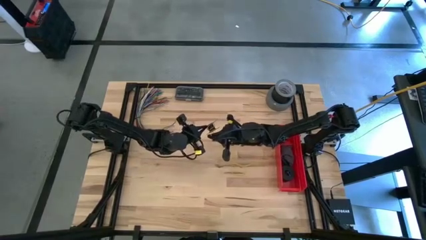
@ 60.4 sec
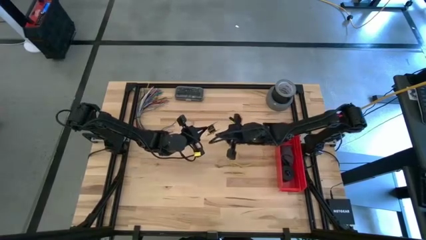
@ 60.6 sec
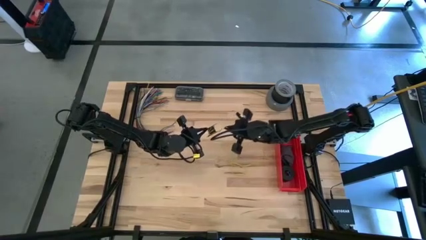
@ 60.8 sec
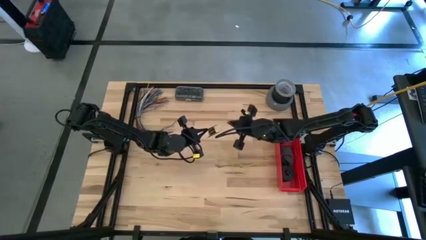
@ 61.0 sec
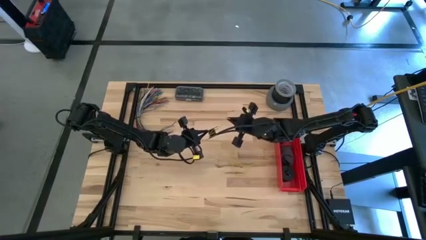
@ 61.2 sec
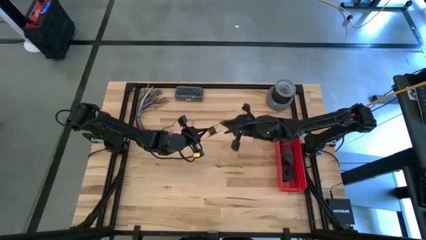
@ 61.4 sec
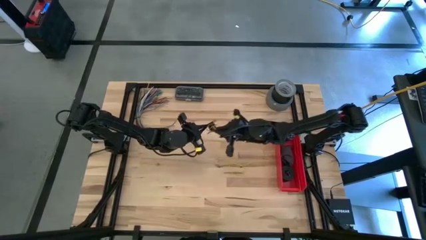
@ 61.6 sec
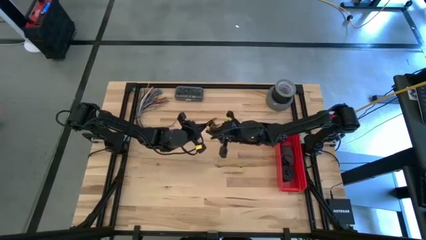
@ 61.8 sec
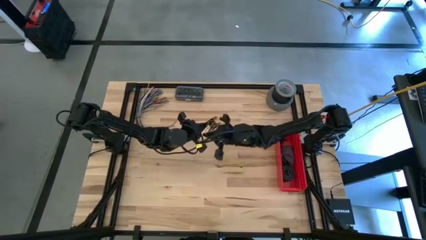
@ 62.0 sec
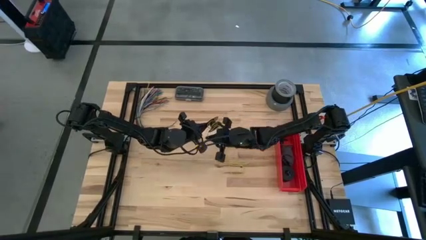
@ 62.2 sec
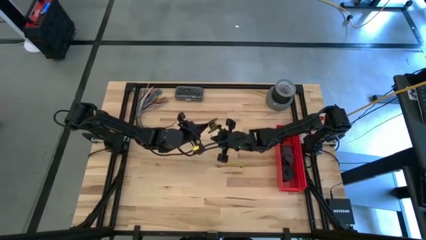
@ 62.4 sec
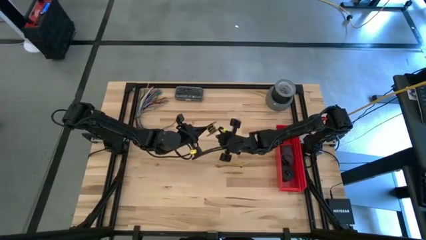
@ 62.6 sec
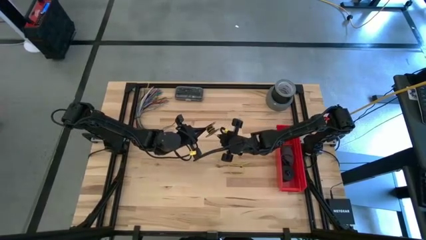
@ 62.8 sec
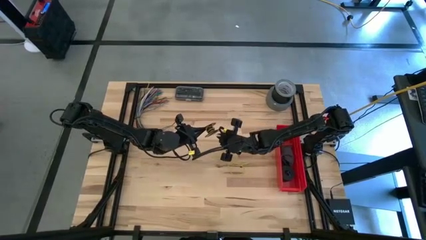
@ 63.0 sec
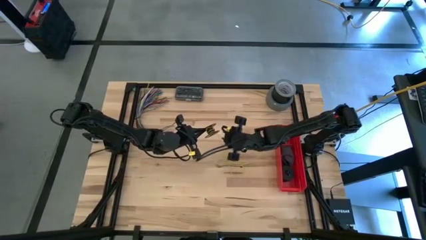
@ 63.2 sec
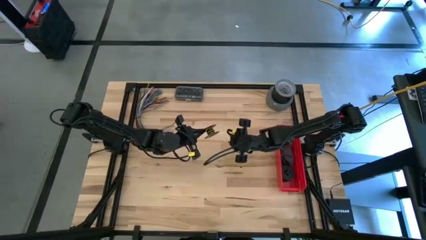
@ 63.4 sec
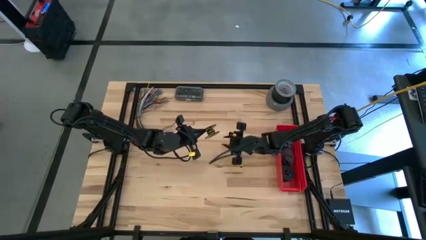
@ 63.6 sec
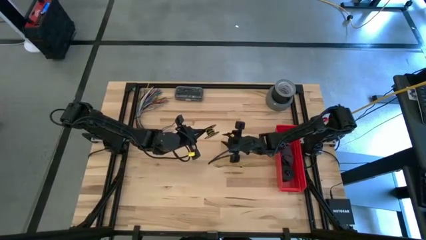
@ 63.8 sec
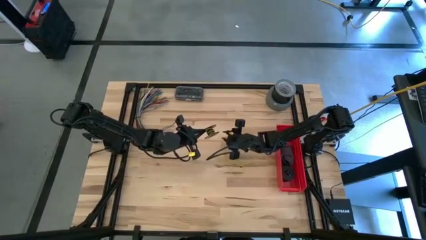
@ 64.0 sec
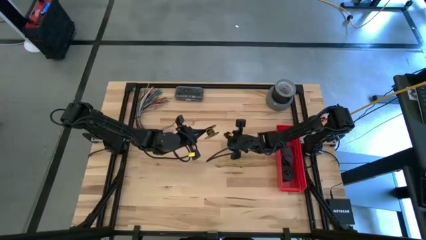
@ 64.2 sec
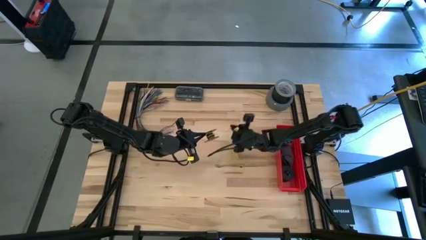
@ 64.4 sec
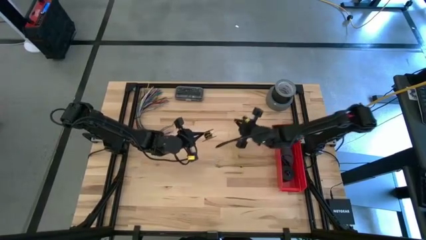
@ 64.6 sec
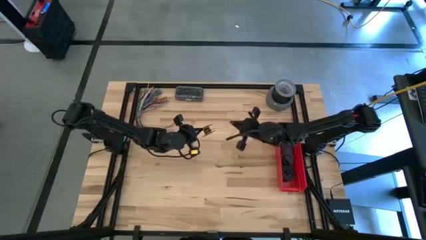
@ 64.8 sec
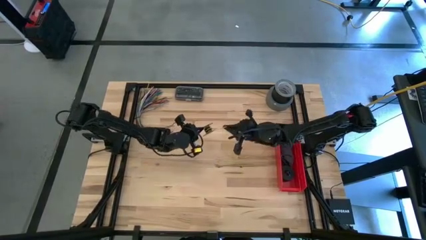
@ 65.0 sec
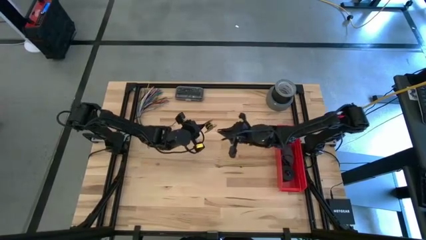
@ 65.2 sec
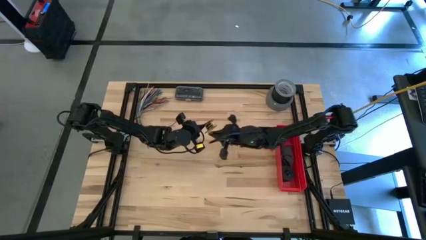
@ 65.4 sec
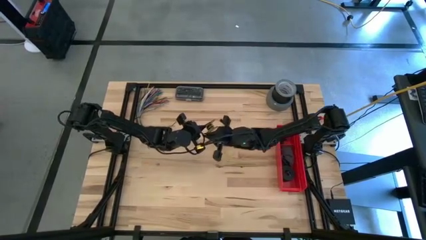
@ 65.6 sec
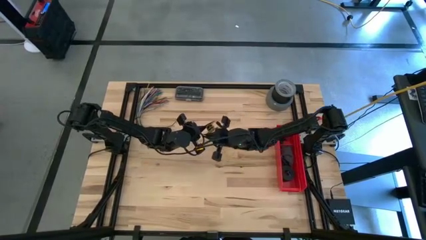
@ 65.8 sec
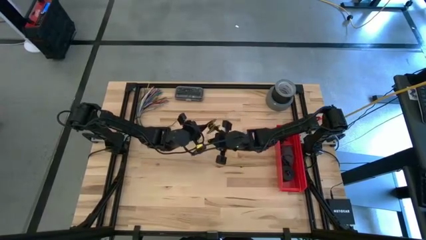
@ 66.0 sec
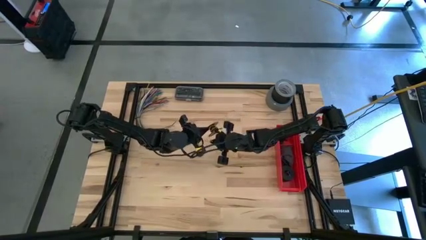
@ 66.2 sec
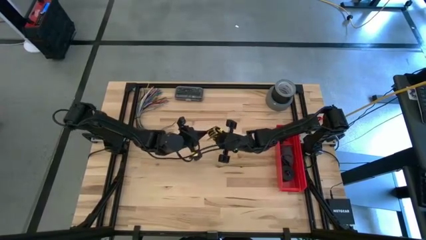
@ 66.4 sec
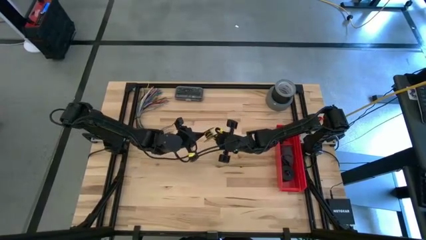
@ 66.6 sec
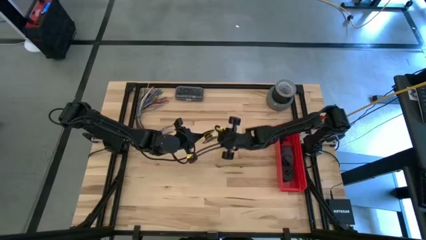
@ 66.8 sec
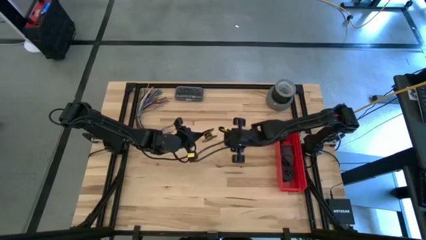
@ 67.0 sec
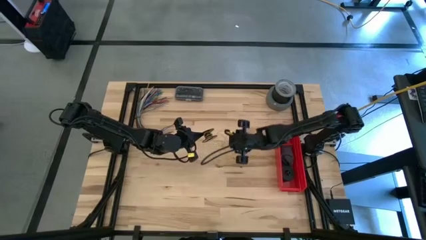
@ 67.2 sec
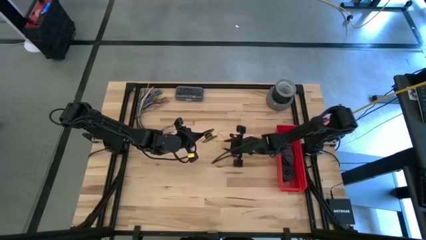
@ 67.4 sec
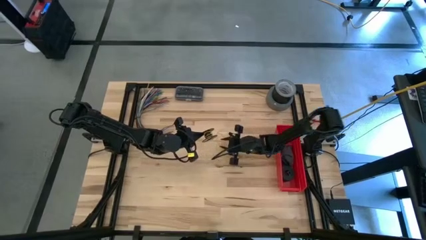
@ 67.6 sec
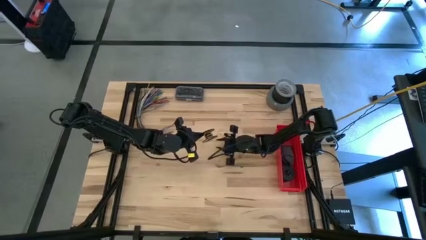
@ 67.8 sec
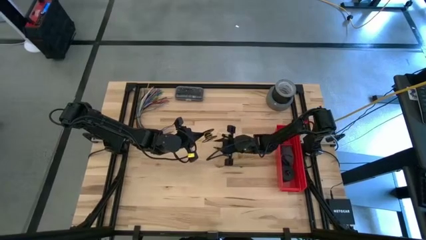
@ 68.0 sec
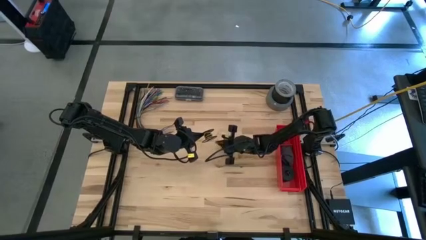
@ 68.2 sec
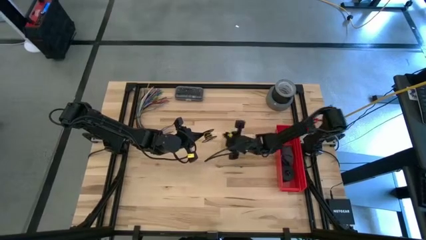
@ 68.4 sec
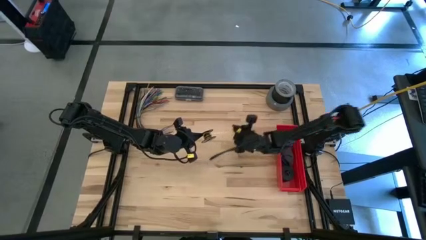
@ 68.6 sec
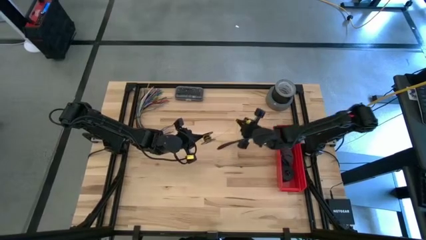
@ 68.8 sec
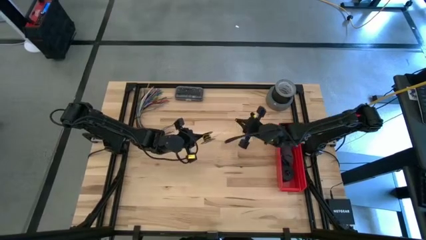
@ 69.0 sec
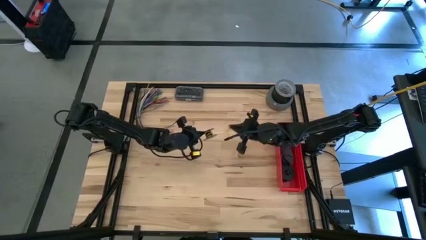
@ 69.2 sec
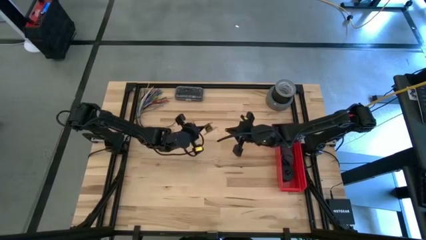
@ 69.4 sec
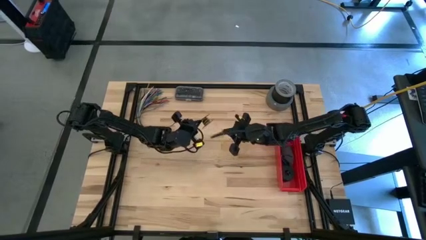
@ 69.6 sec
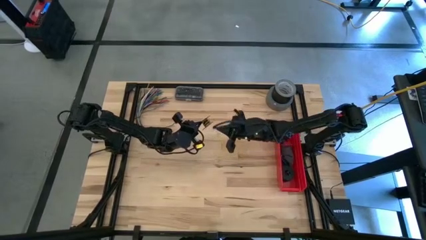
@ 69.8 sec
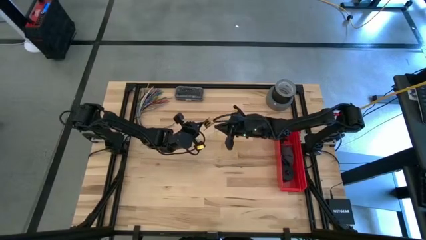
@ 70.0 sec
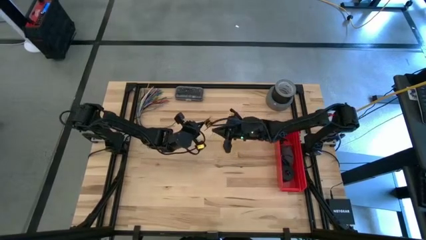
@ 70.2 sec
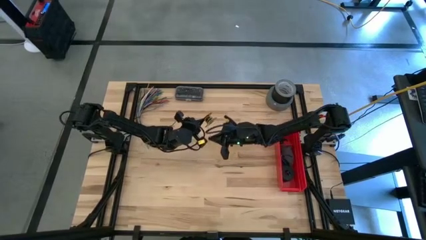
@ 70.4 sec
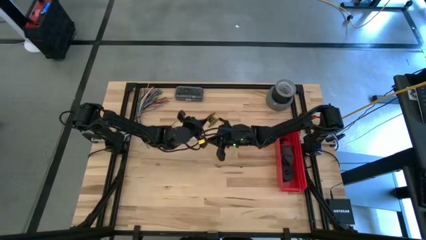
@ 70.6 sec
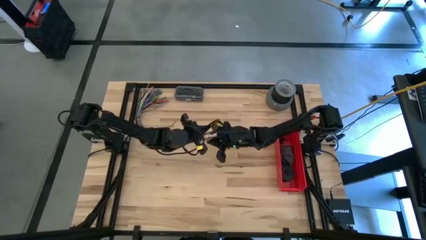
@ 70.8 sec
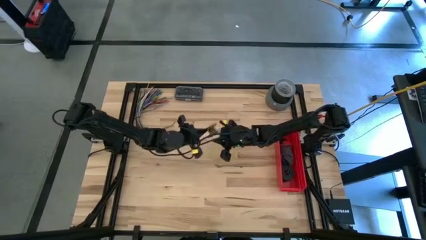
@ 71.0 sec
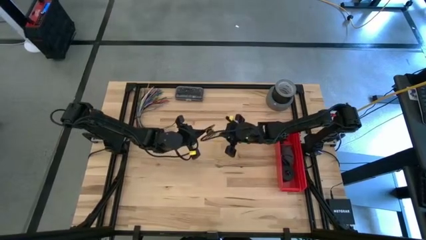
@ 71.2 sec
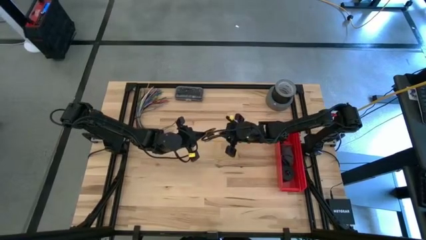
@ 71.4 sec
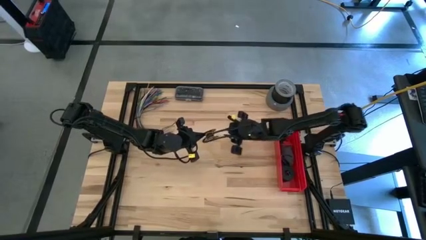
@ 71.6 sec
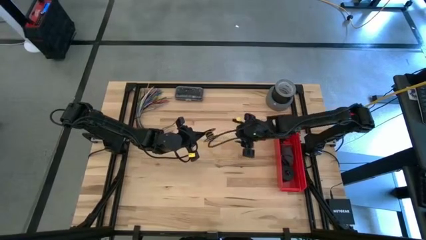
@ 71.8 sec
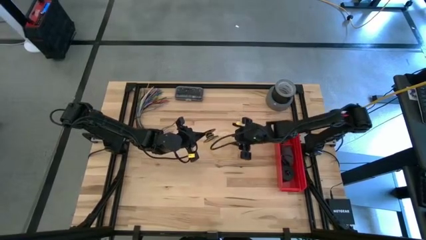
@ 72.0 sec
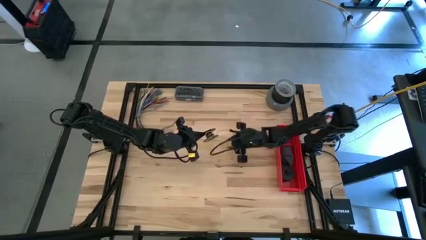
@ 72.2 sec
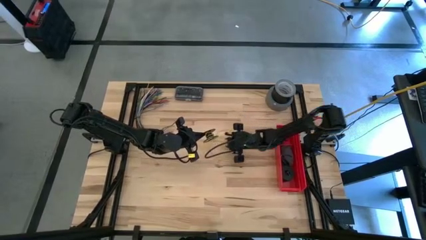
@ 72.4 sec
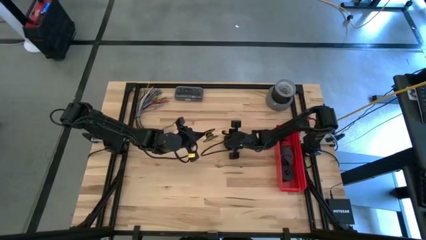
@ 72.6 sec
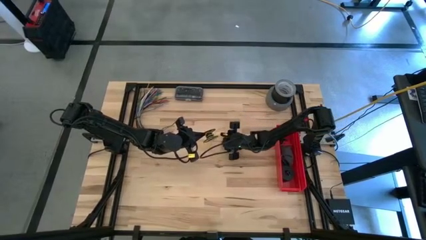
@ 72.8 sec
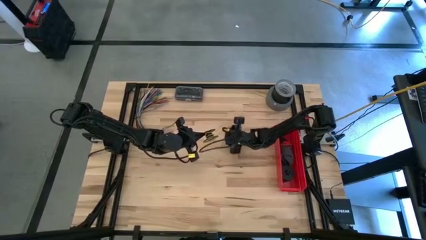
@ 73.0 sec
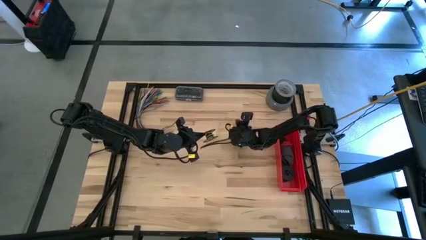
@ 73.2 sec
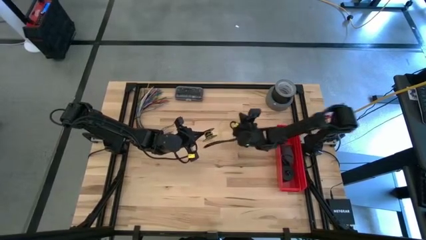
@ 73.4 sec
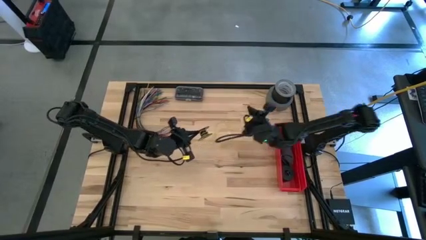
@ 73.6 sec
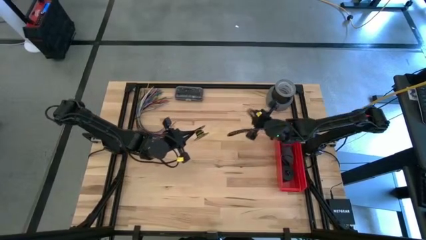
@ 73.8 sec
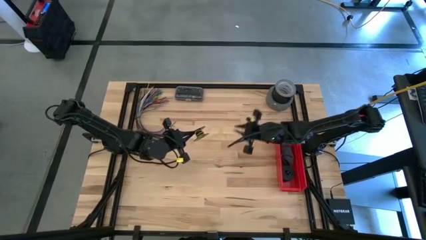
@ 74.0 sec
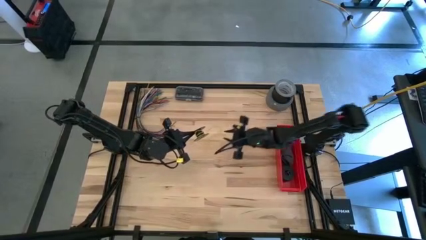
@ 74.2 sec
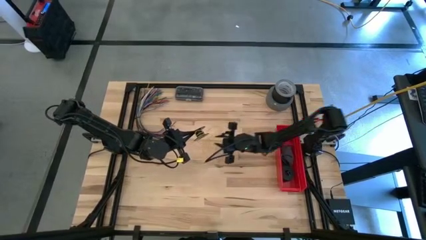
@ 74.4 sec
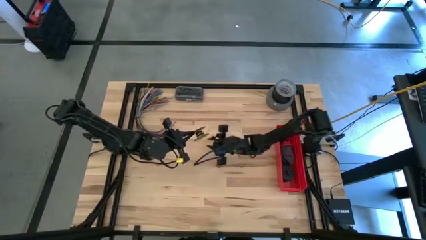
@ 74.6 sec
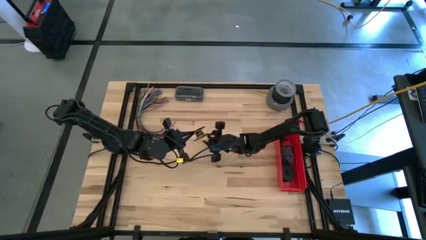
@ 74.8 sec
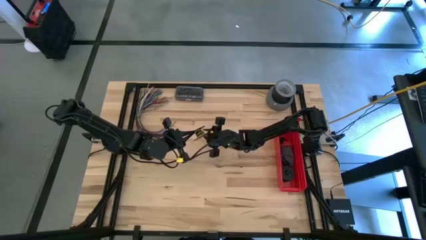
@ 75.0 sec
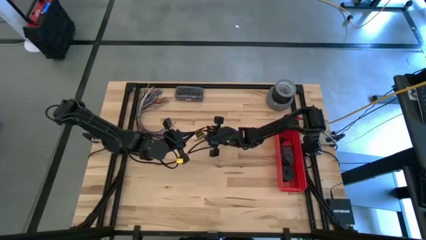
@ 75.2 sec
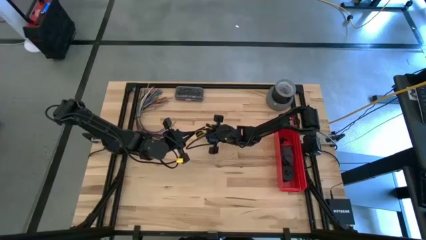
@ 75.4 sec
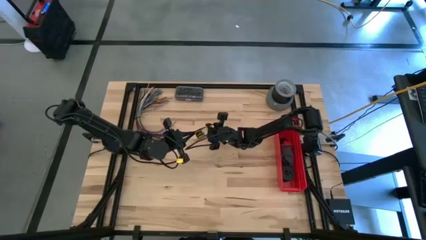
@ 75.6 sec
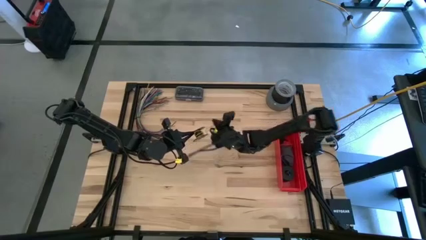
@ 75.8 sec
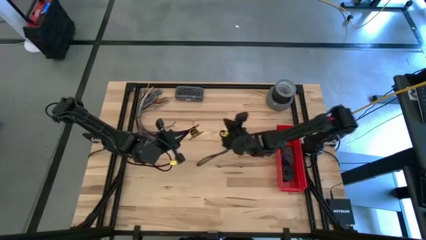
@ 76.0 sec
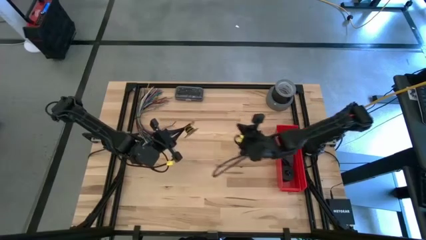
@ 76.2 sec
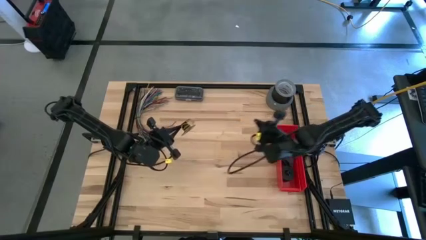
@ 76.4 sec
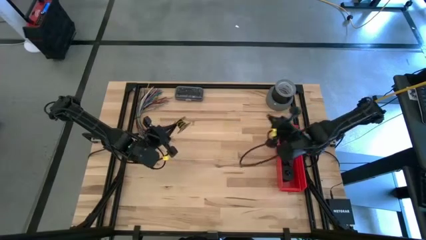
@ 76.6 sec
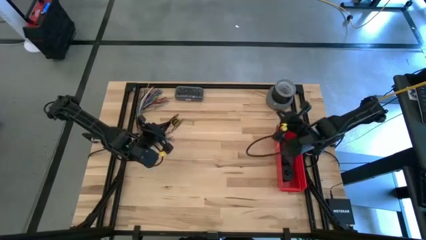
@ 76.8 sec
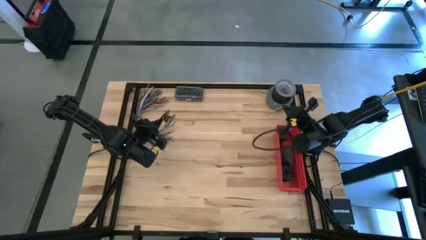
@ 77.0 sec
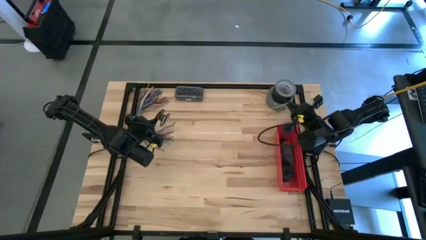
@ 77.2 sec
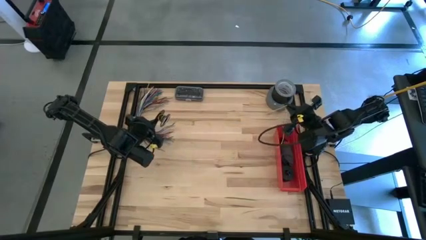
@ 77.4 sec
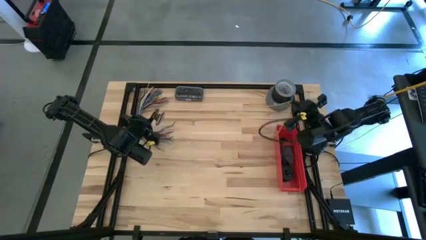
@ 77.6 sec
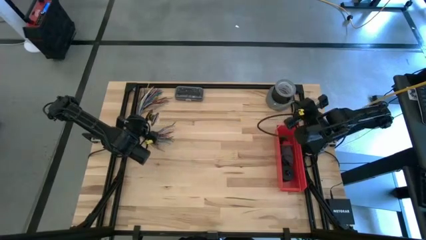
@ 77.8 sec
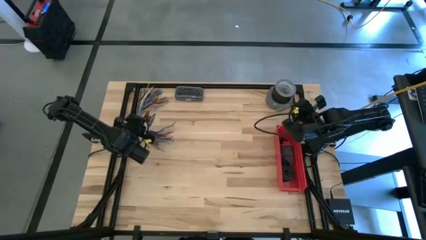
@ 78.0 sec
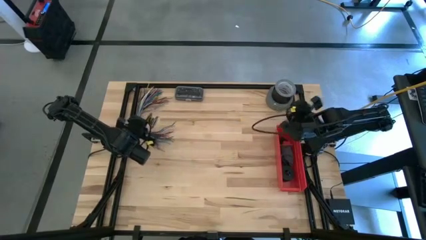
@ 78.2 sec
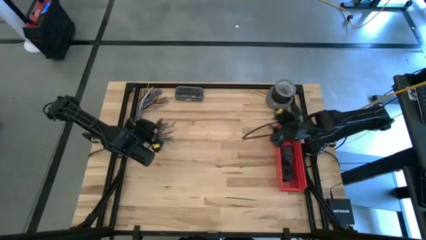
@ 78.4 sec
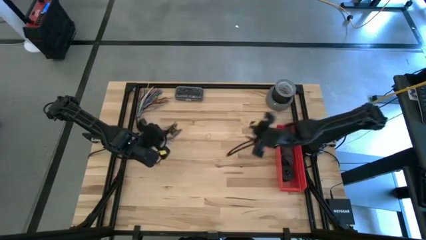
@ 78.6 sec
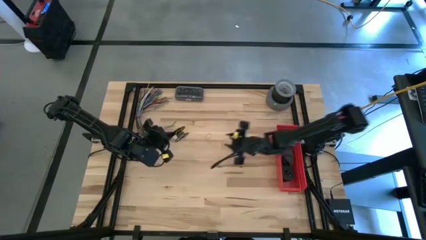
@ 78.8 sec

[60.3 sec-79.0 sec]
Task: Coil cords
Coil the yellow wire onto the black spool
